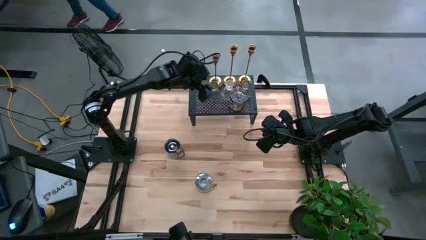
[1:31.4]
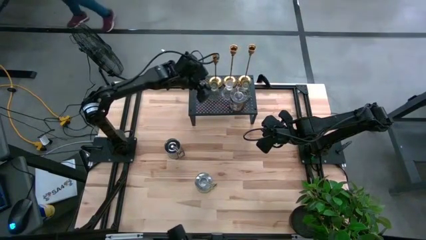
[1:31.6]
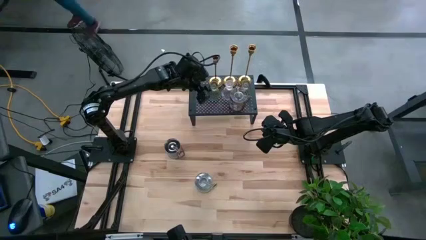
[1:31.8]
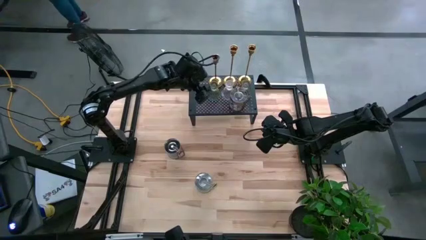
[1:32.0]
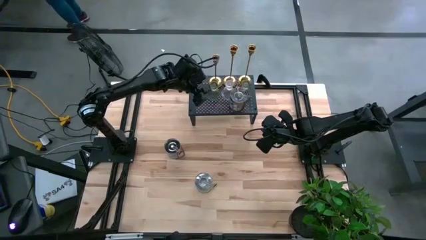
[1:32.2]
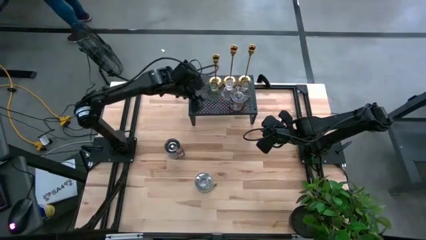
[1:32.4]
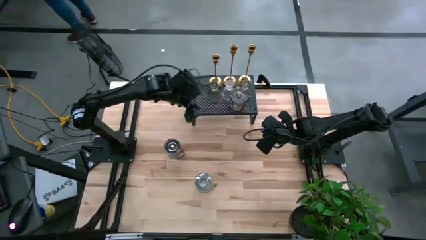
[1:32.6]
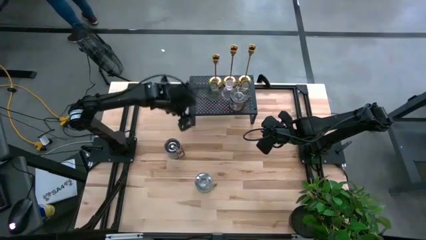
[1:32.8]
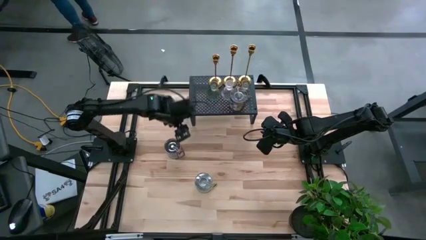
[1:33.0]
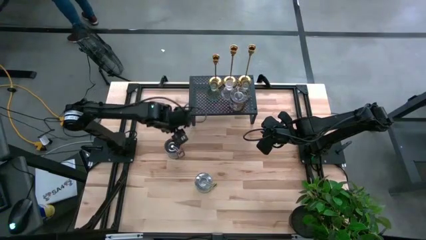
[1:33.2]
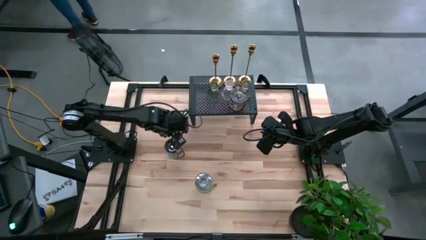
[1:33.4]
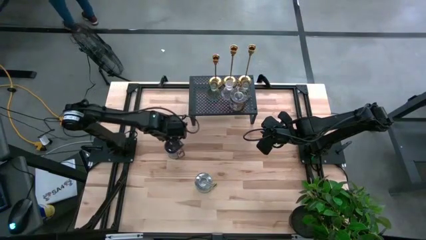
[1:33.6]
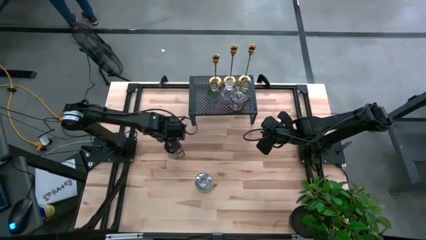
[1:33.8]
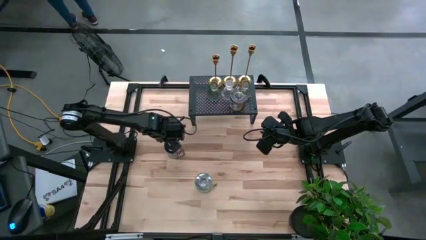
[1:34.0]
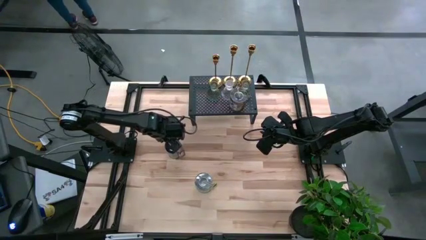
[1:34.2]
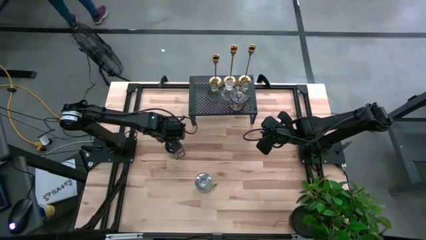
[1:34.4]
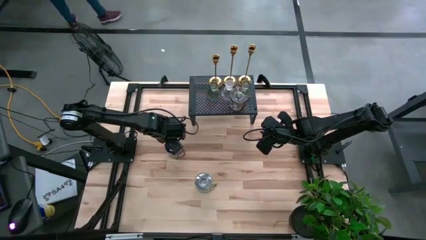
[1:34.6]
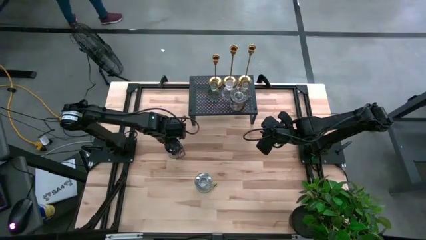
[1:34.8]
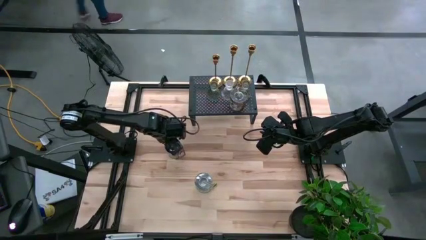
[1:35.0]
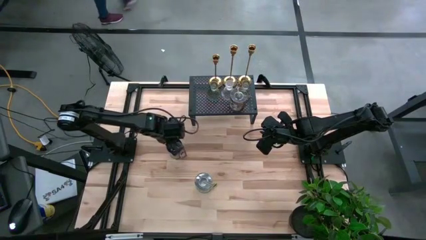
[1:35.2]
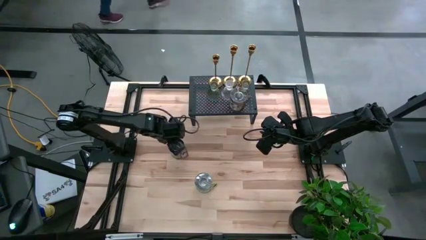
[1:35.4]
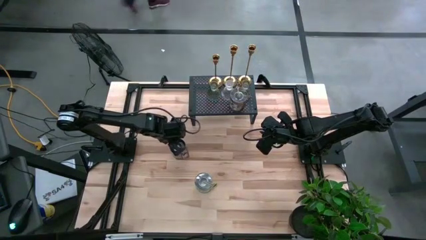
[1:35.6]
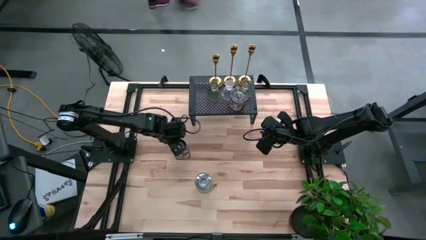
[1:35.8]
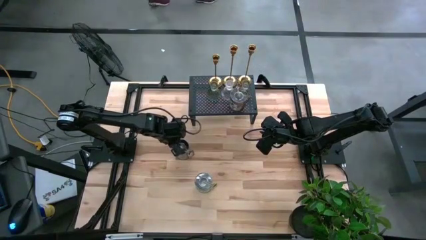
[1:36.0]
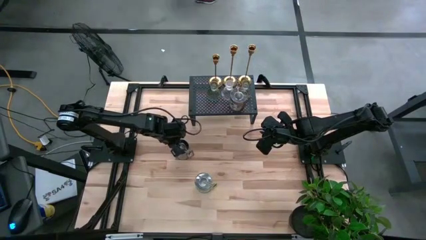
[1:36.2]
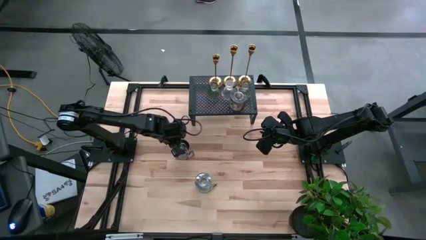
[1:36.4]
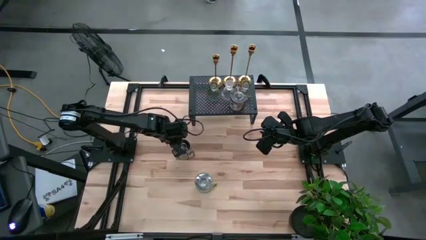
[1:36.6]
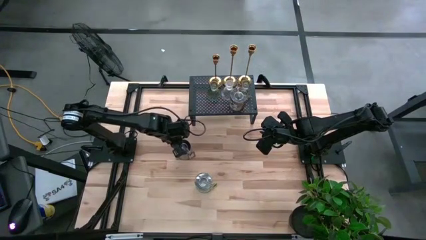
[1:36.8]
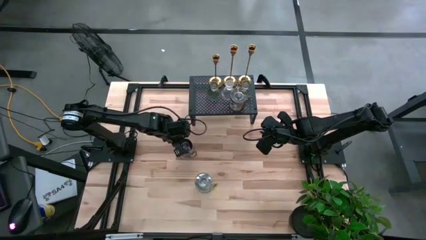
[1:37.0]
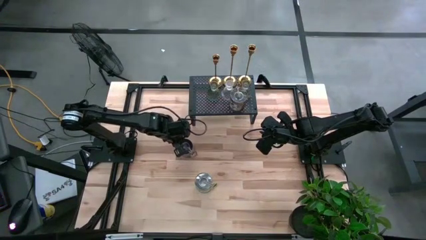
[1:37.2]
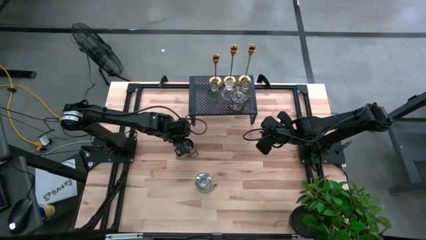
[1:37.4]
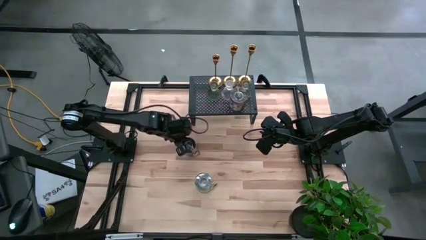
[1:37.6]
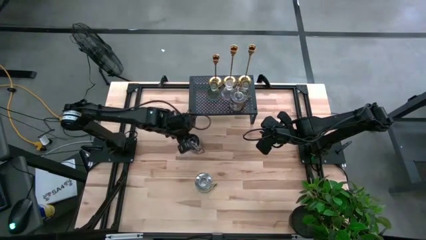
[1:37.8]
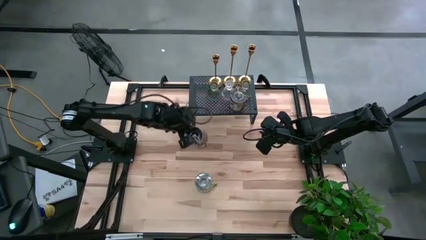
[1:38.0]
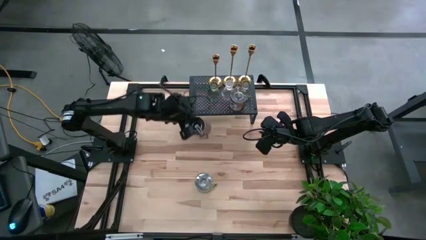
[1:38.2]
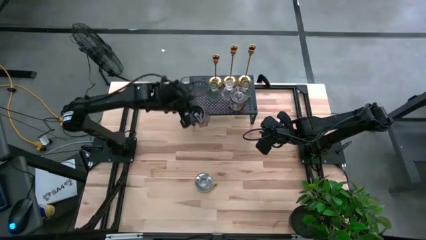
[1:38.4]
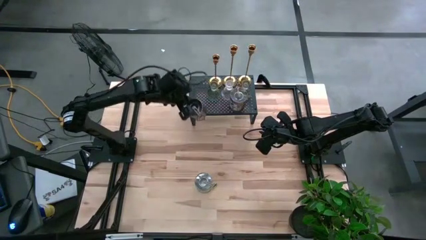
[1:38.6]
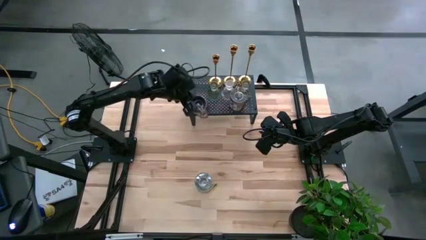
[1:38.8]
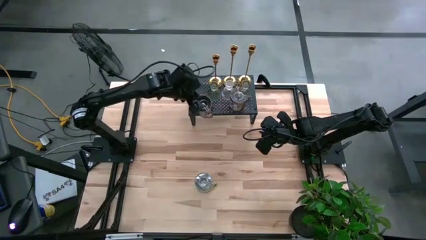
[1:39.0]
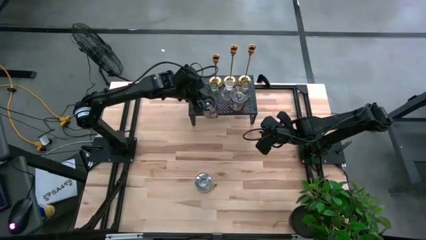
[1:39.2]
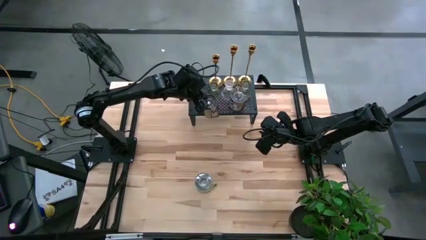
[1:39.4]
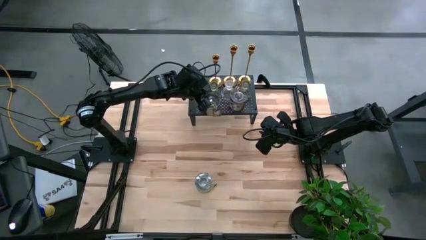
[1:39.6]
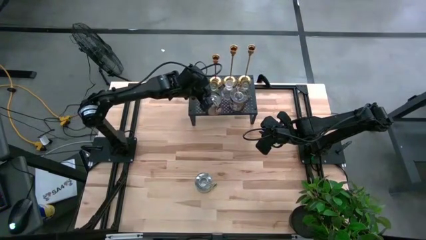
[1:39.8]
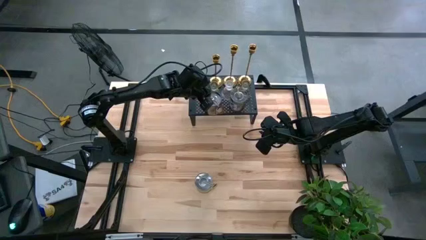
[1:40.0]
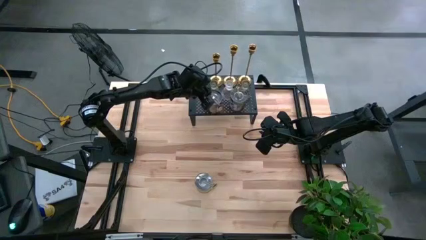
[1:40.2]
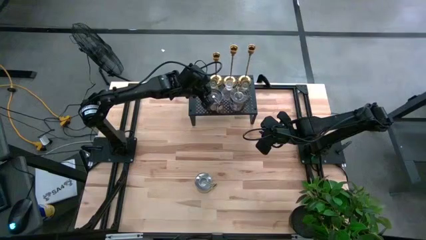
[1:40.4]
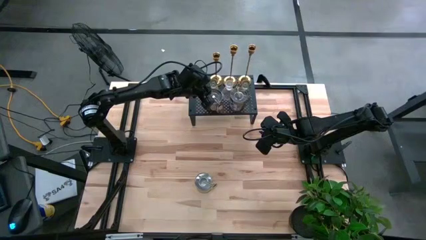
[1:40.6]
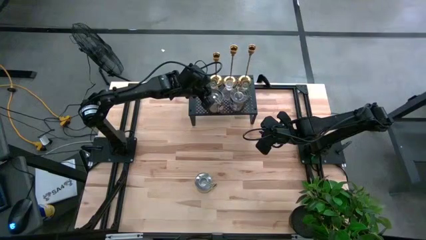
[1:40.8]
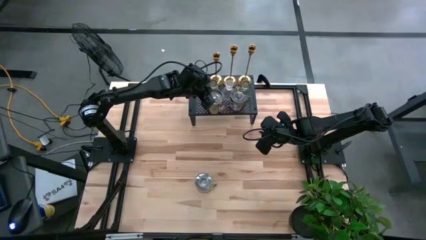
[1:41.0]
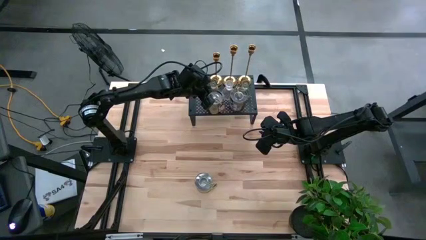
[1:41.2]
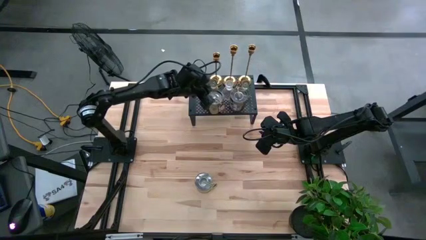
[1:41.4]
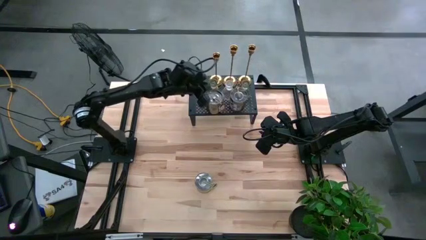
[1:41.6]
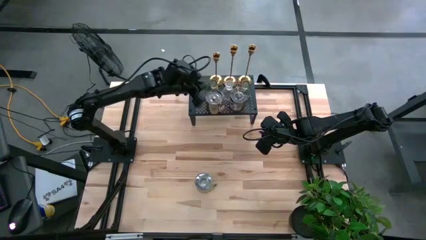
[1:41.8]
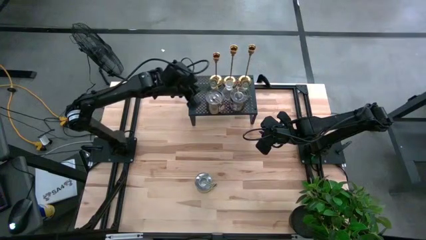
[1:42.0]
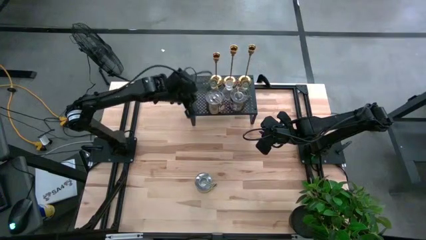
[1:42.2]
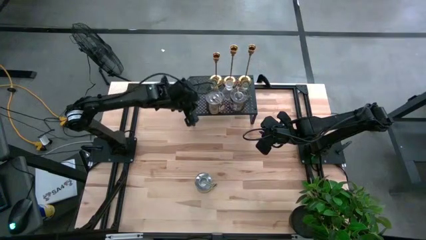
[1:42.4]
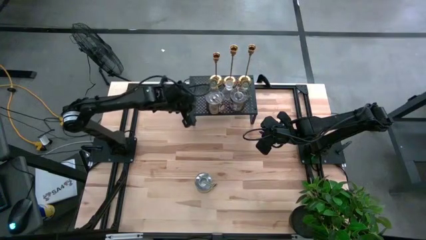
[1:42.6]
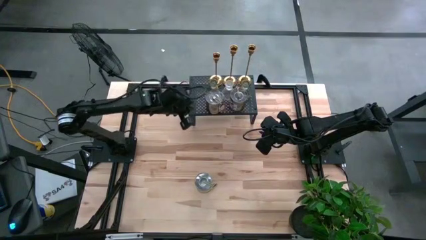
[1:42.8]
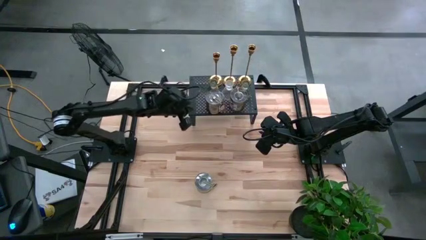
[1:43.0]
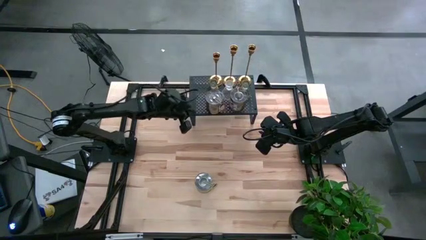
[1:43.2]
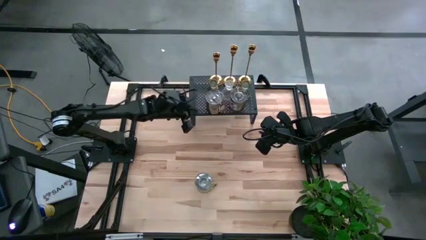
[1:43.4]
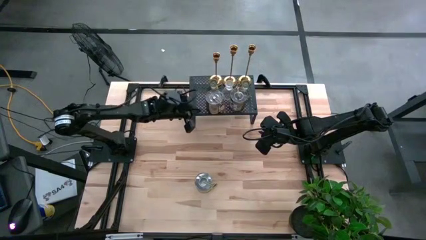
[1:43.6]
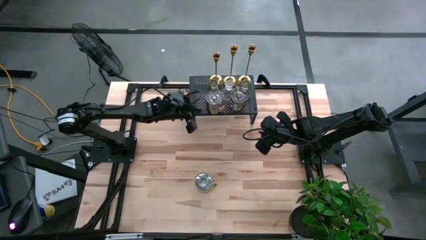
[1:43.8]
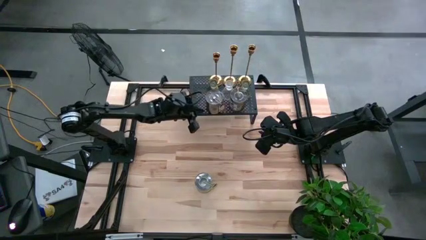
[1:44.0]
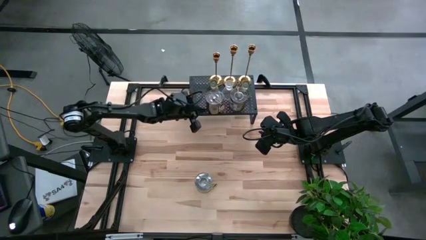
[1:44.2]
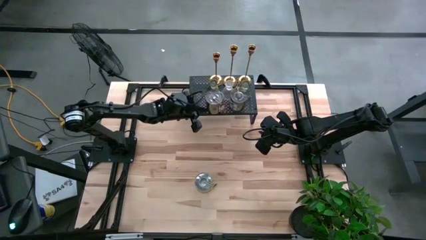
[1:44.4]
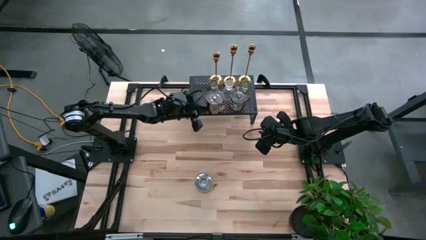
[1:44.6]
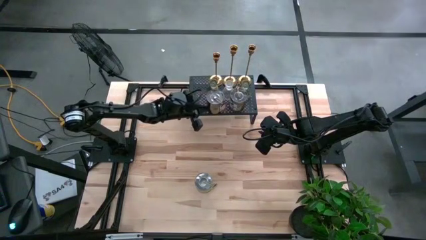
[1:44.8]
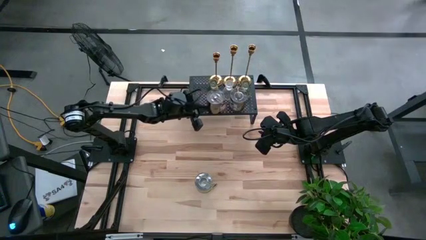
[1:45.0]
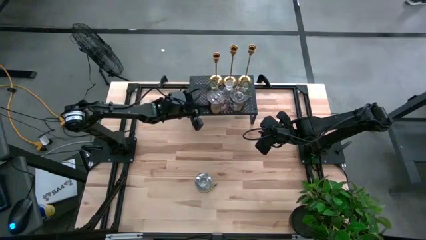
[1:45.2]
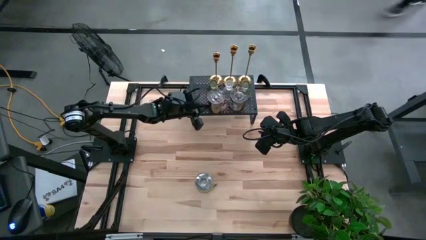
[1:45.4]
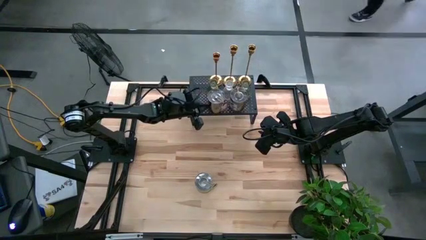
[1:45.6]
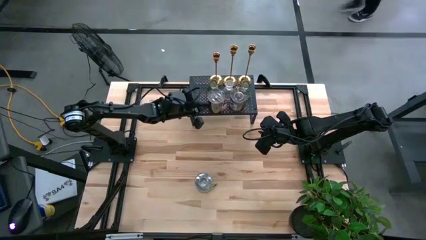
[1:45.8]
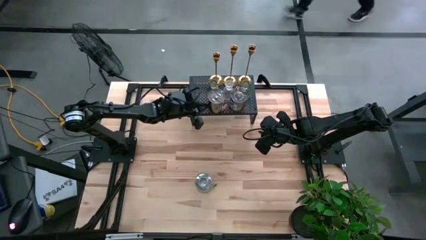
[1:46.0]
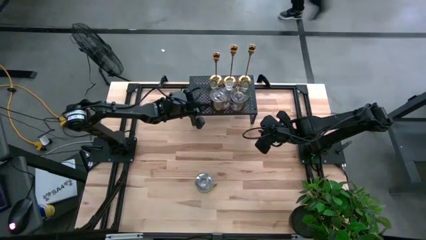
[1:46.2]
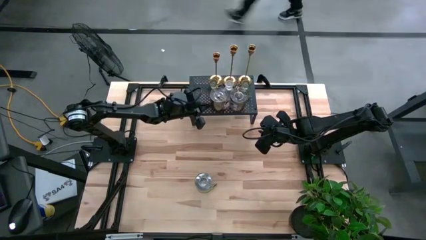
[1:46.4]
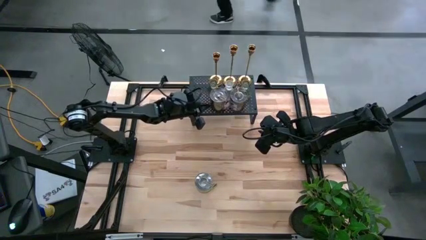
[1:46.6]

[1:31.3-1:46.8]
Task: Pick & Place candle stick holders
Put the top silver scented candle on the shelf aligned with the silver scented candle
